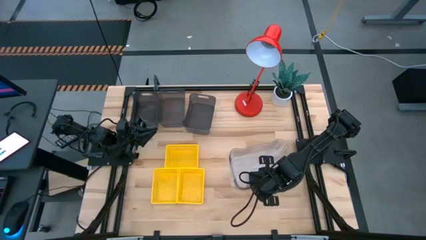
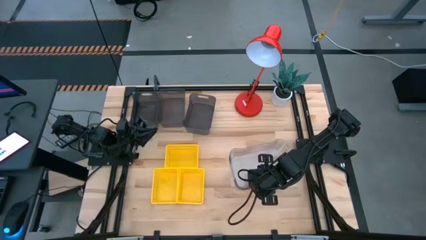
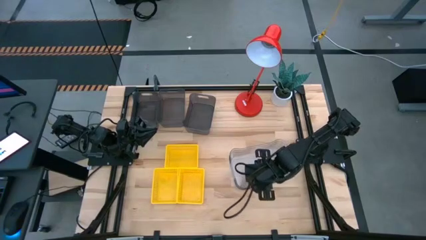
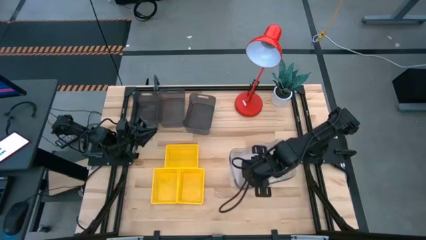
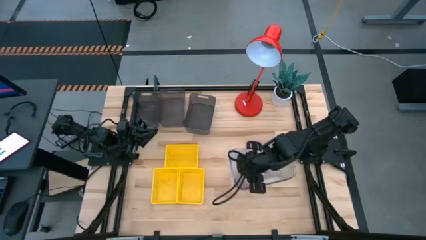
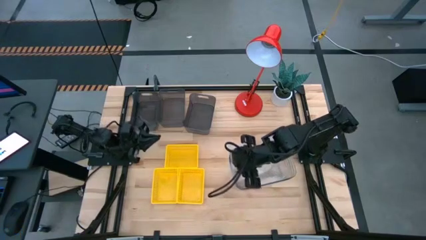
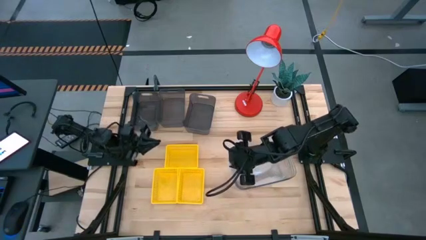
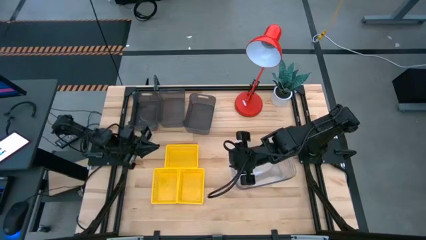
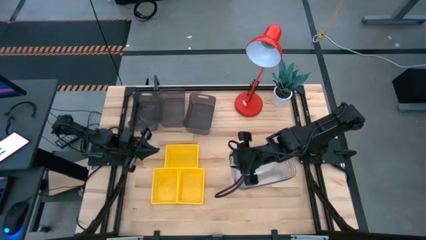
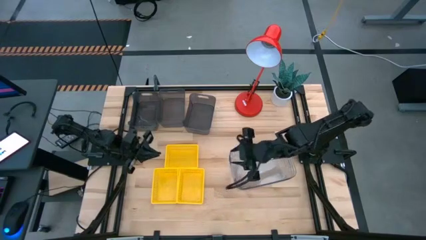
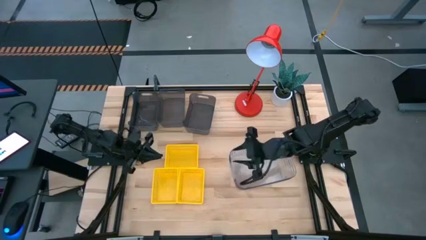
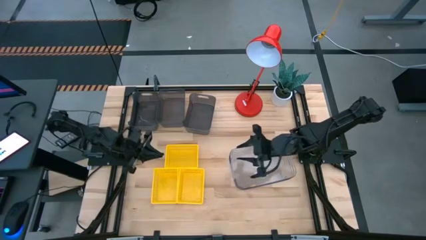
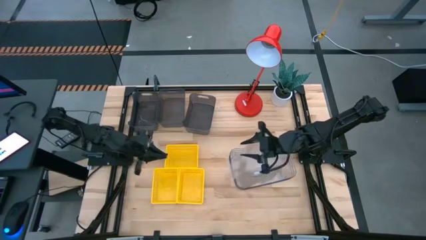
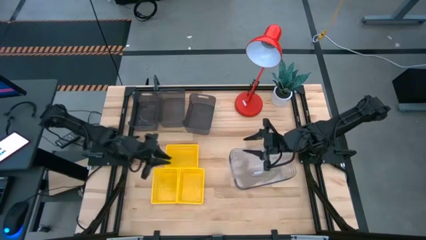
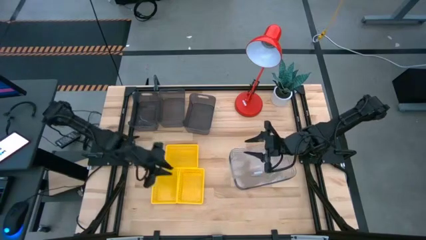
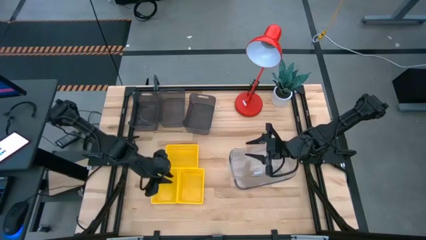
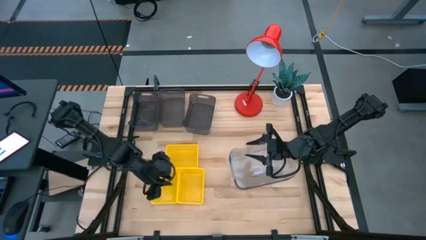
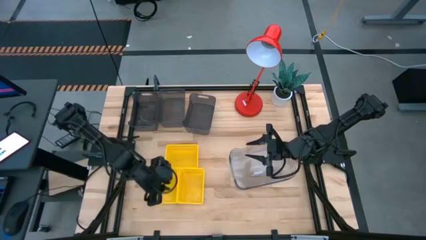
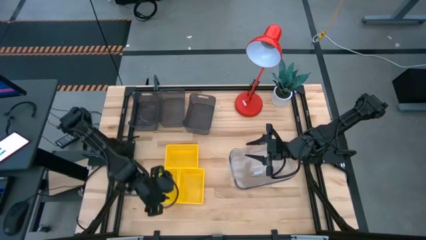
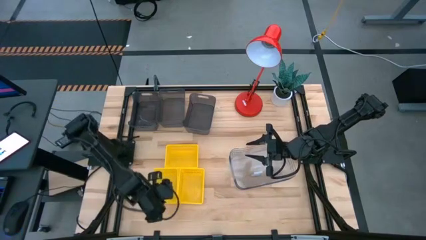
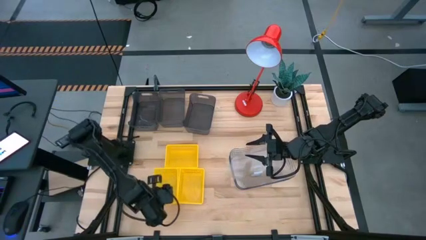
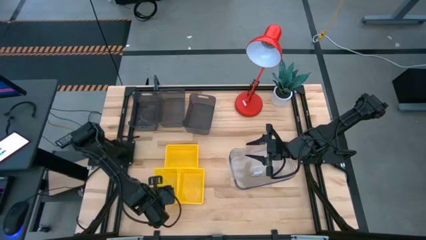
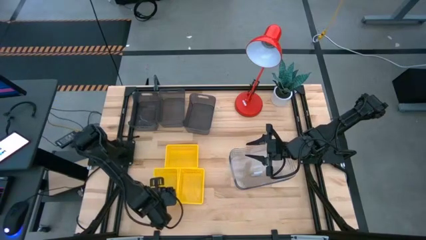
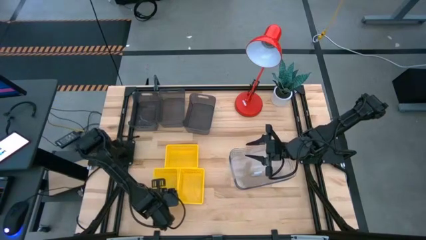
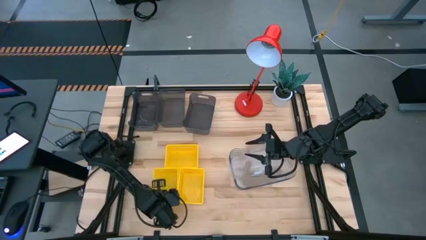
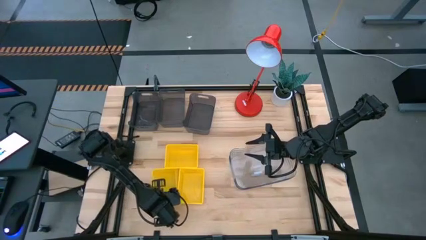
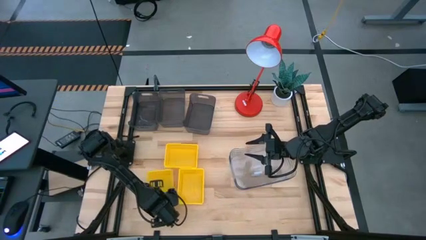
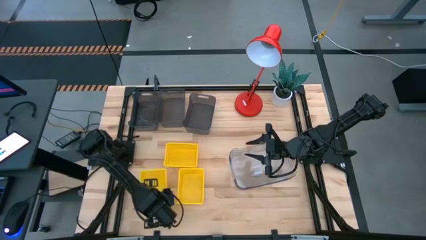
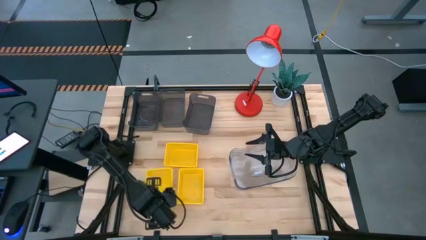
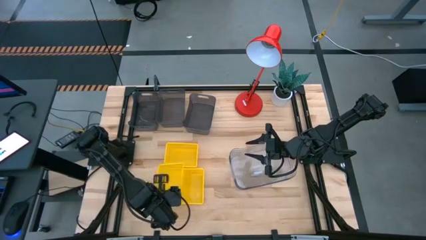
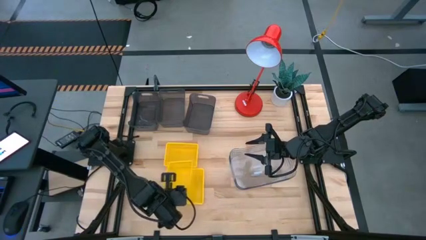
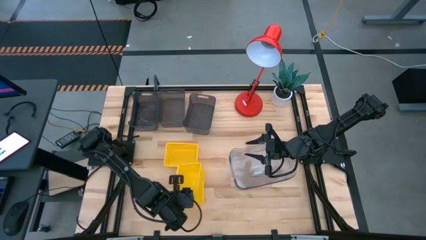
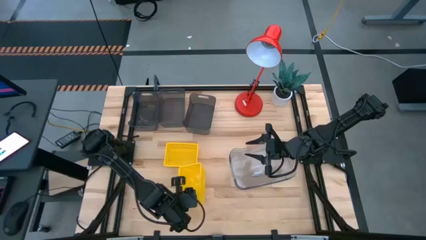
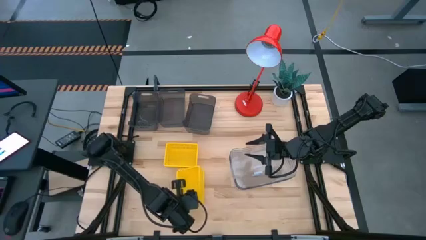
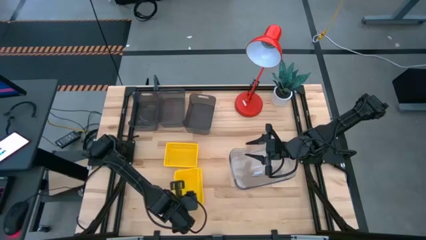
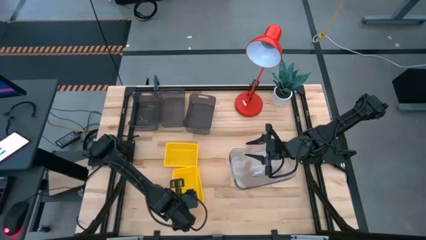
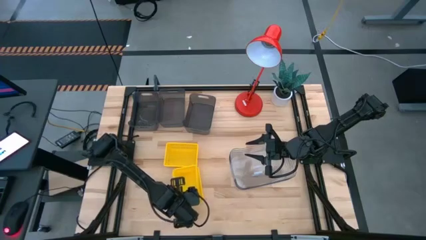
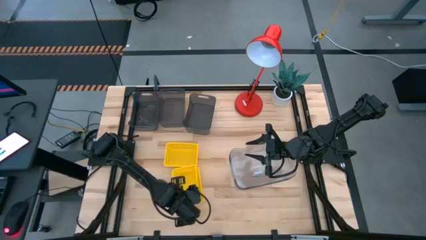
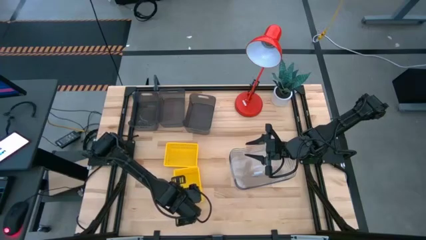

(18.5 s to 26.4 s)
Stack the bottom left yellow bin on top of the bottom right yellow bin

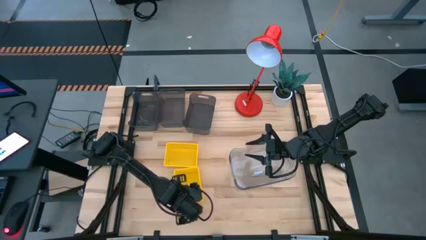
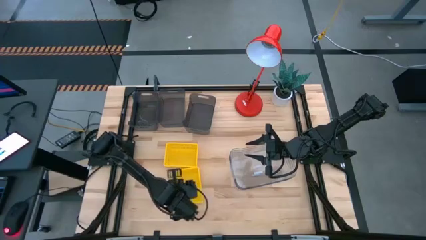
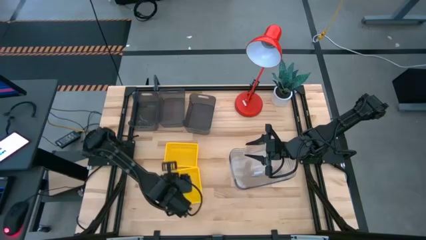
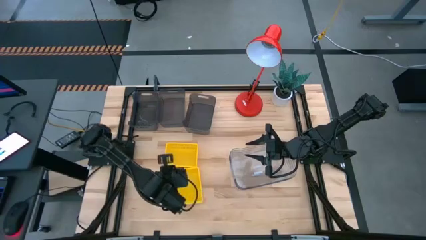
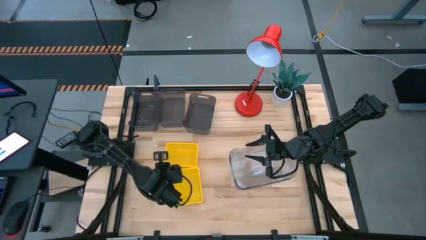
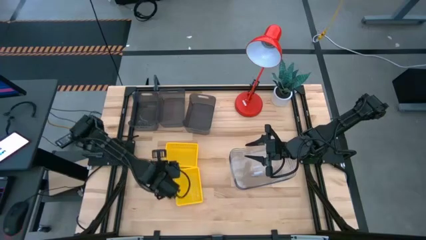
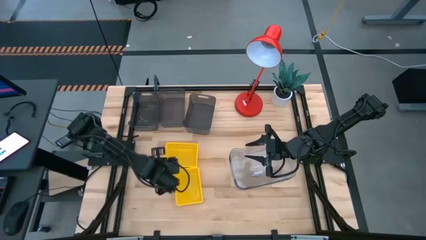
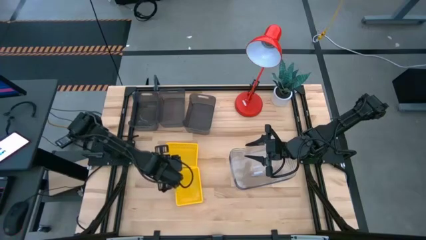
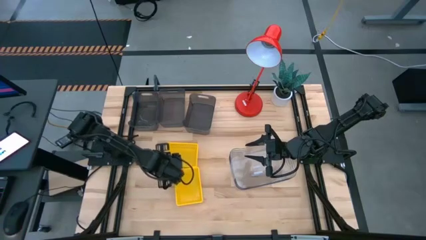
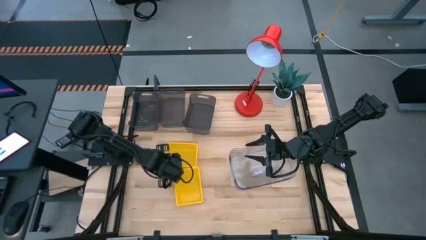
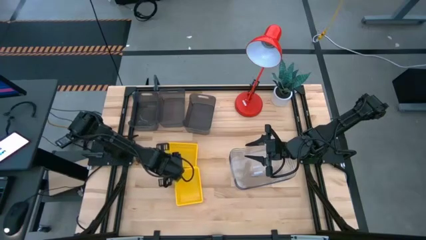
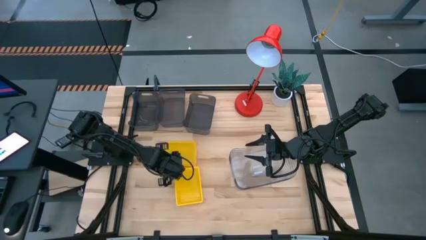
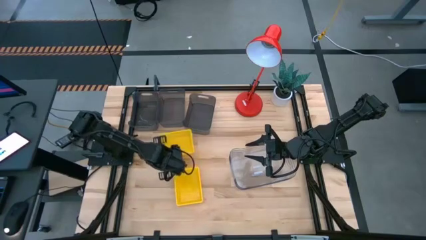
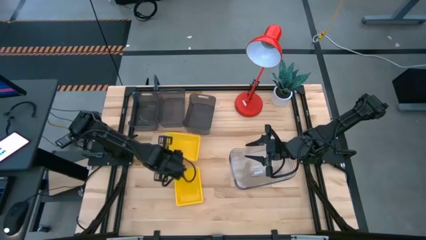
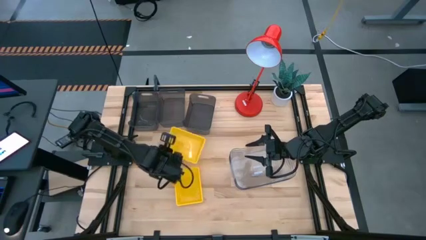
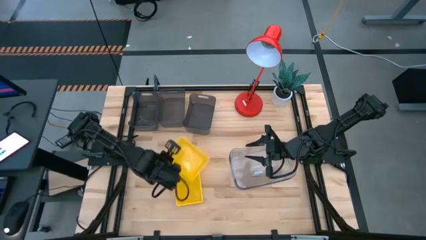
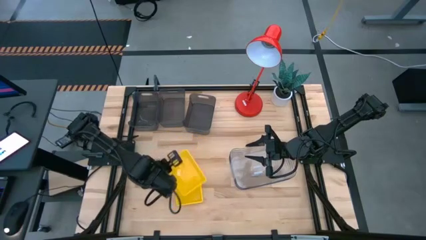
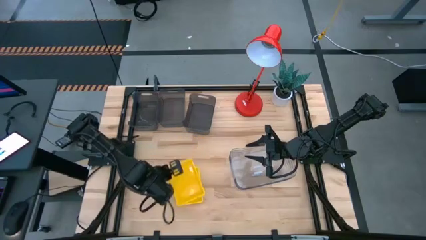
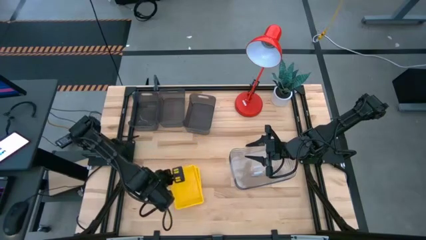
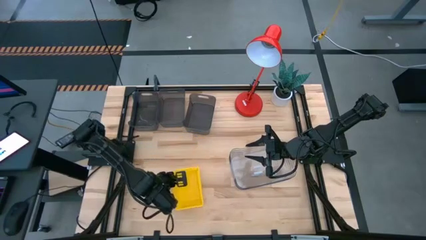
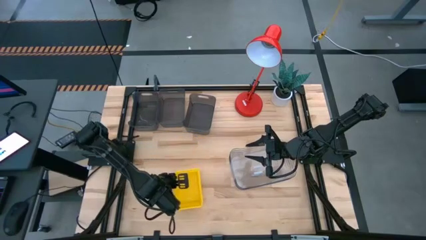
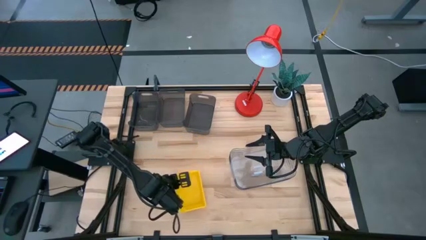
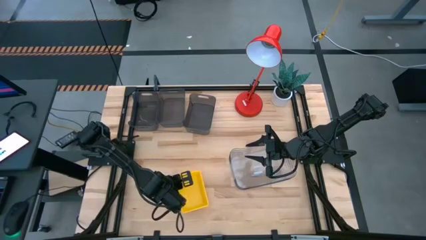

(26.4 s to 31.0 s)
Stack the top yellow bin on top of the bottom yellow bin

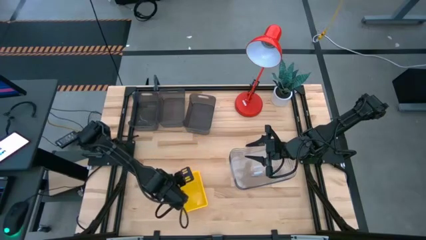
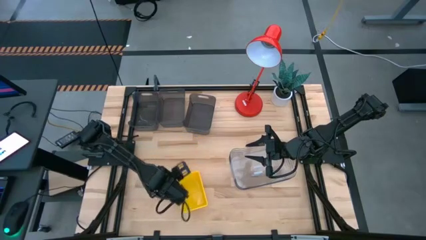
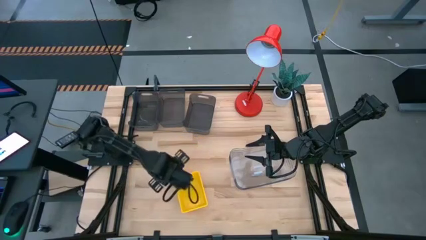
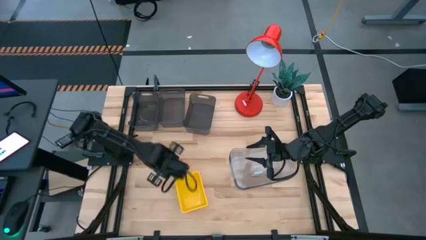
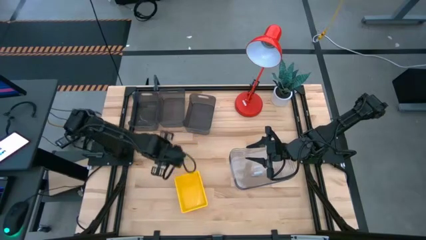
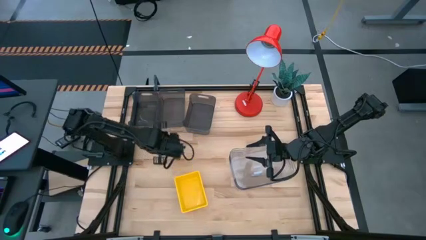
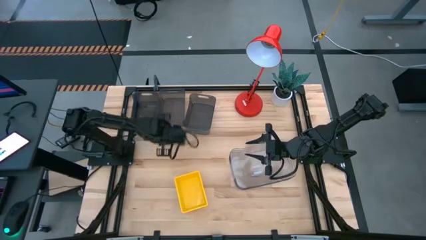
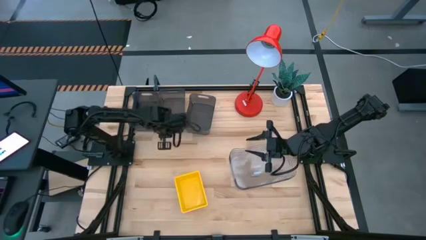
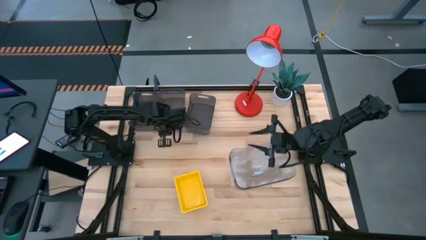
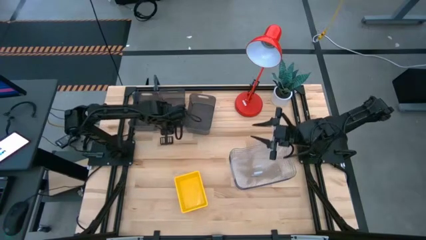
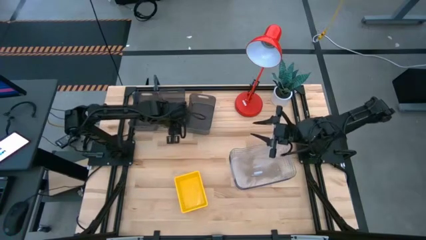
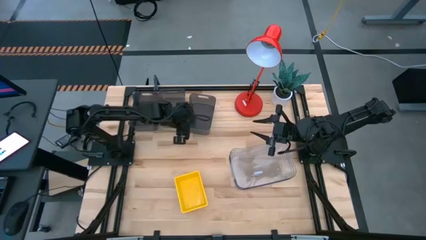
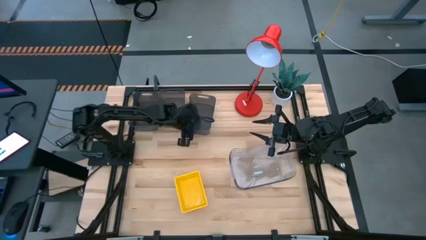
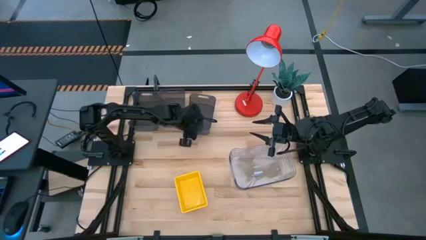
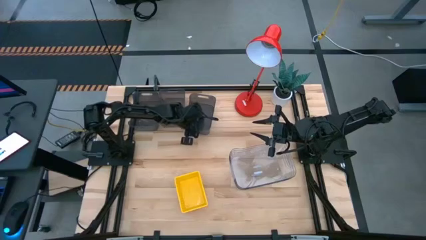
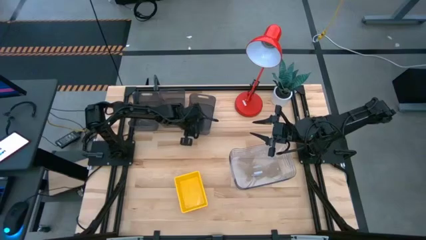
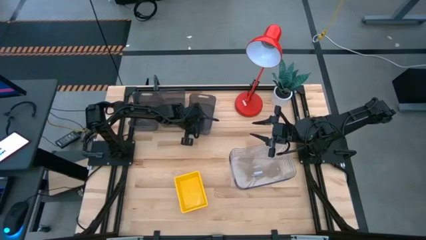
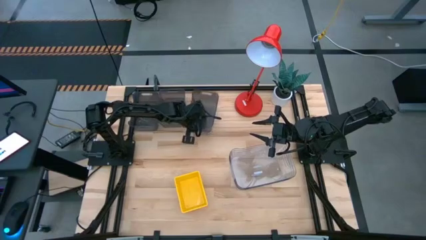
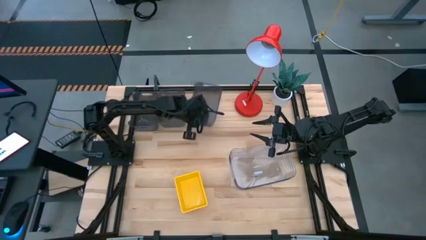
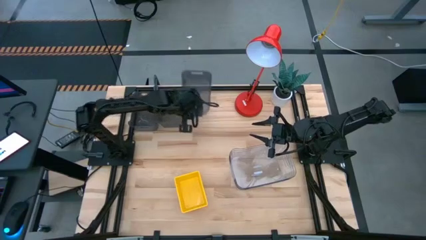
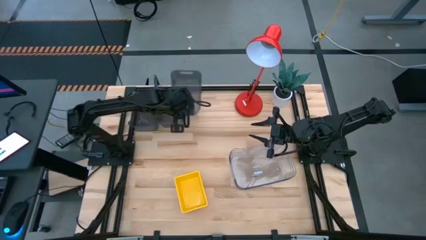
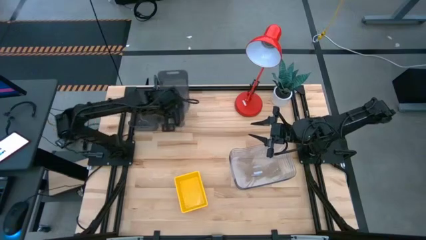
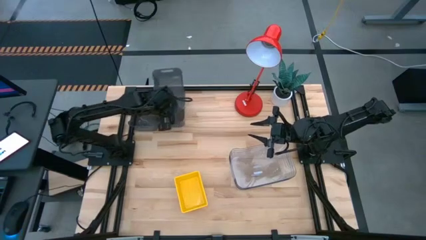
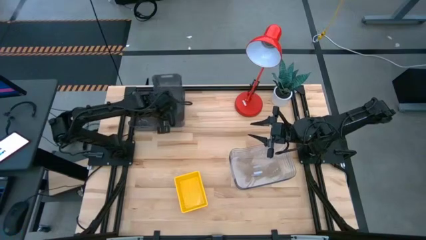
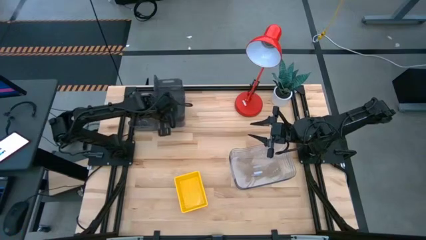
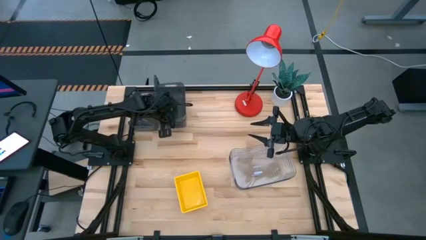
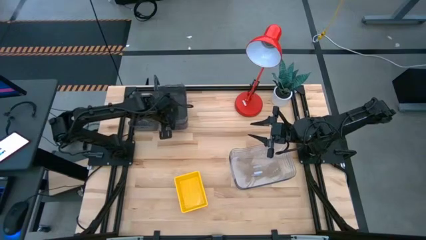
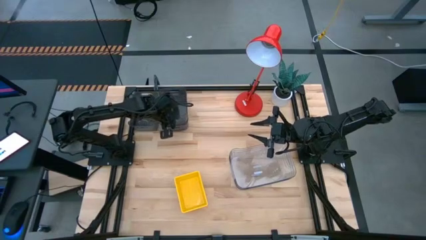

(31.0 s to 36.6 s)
Stack the right black bin on top of the middle black bin
